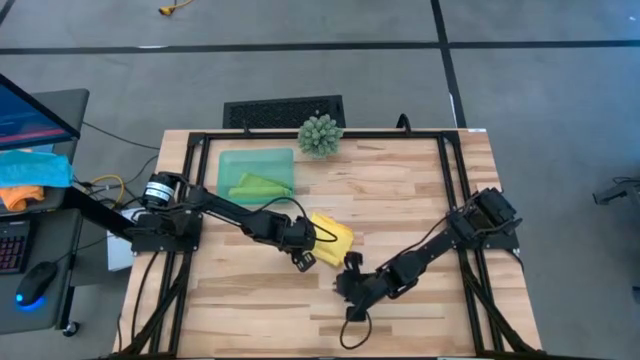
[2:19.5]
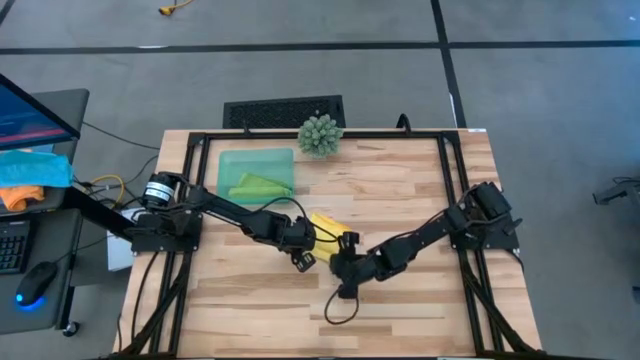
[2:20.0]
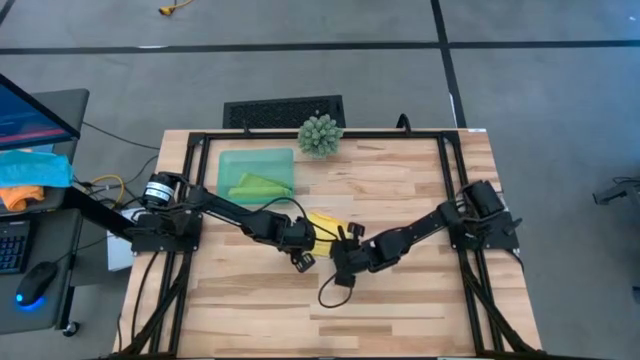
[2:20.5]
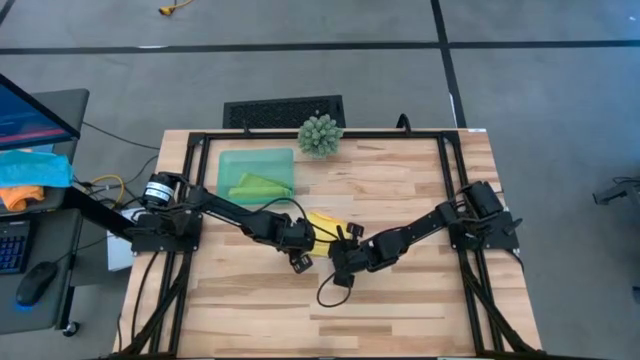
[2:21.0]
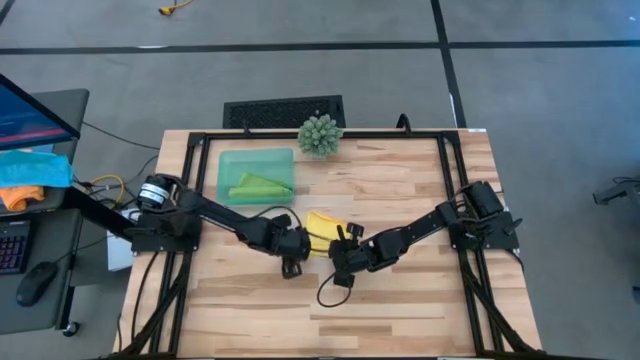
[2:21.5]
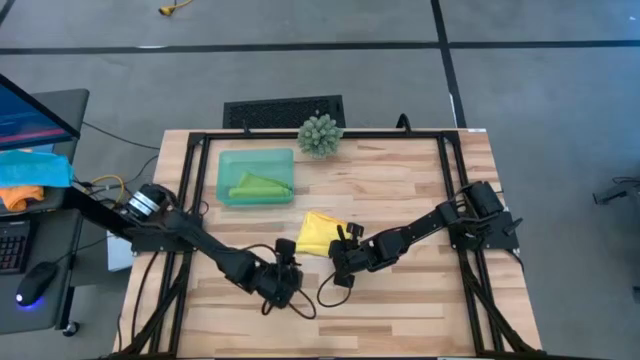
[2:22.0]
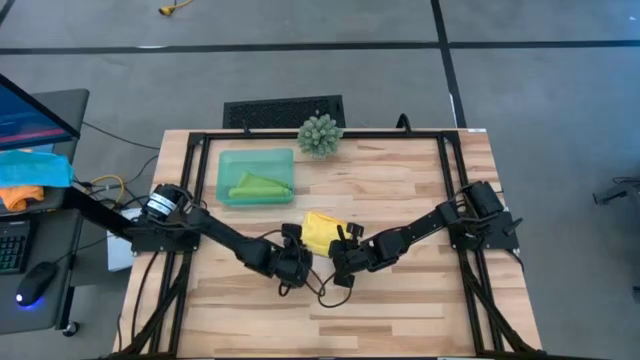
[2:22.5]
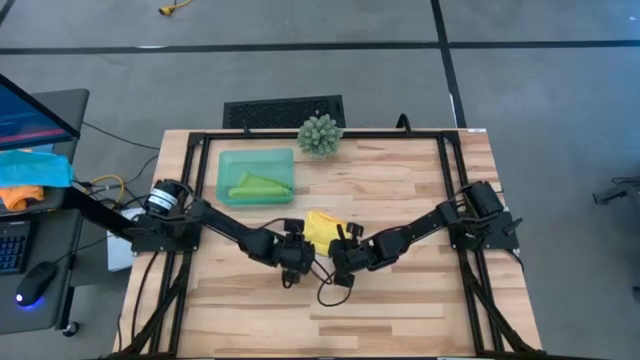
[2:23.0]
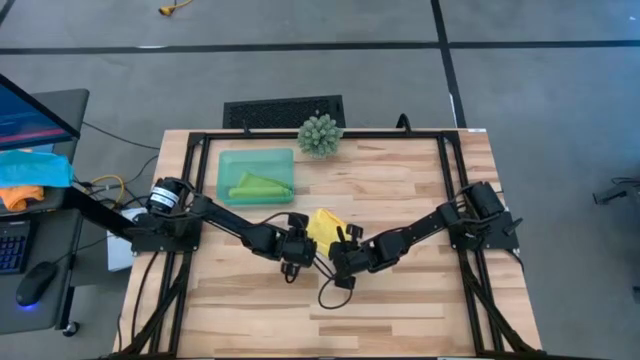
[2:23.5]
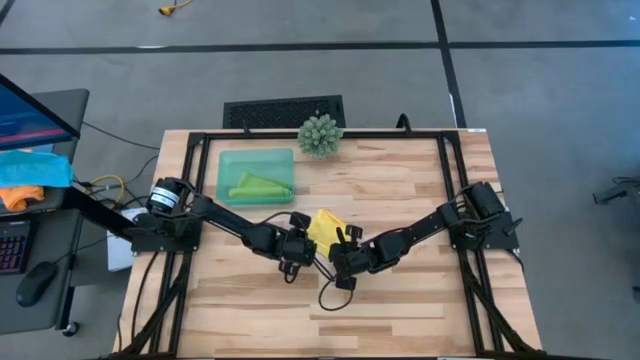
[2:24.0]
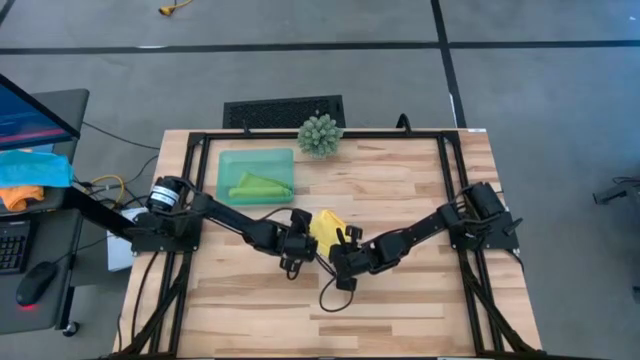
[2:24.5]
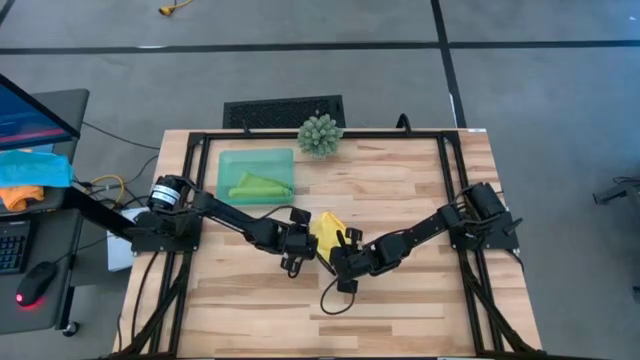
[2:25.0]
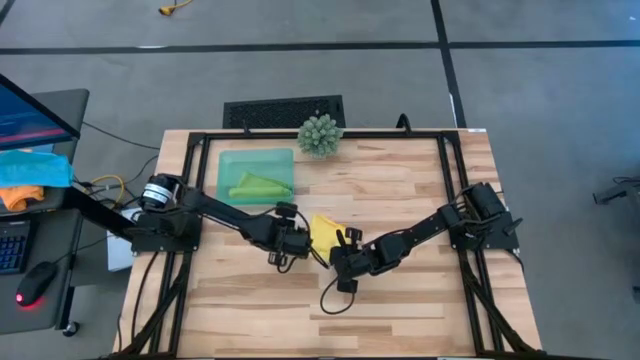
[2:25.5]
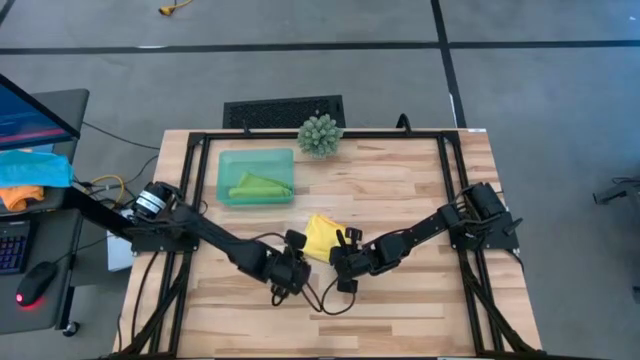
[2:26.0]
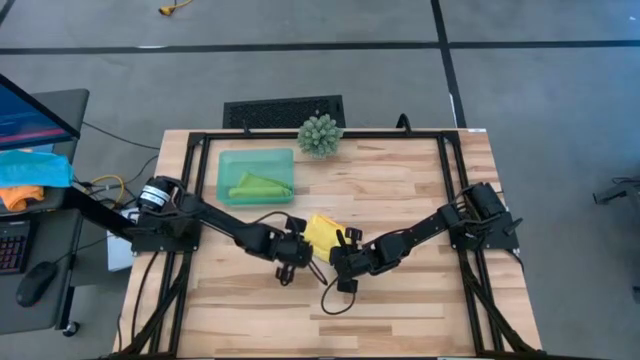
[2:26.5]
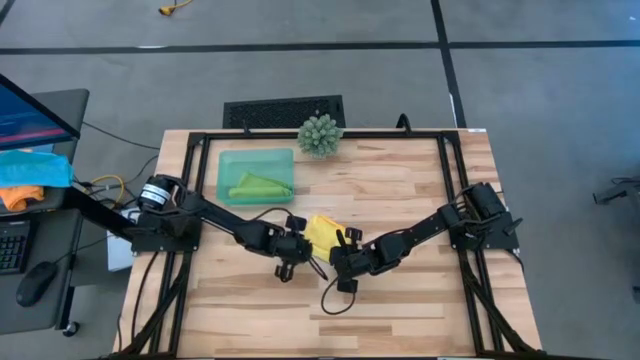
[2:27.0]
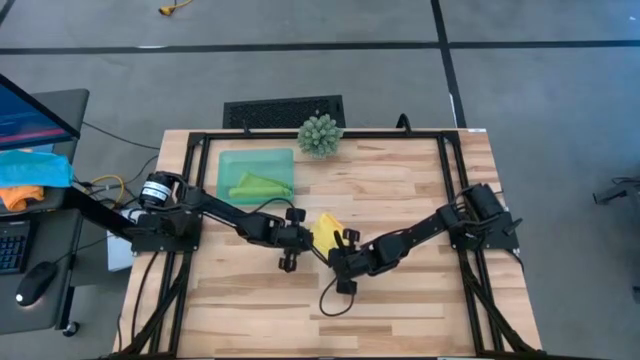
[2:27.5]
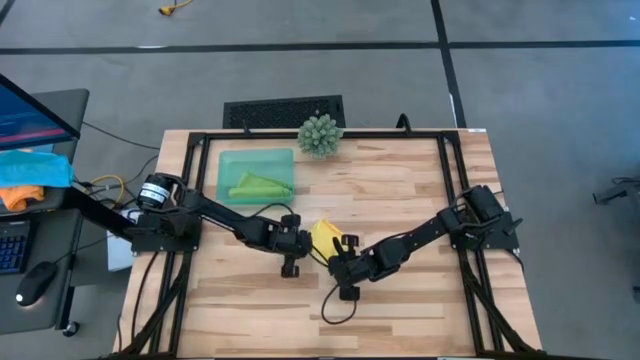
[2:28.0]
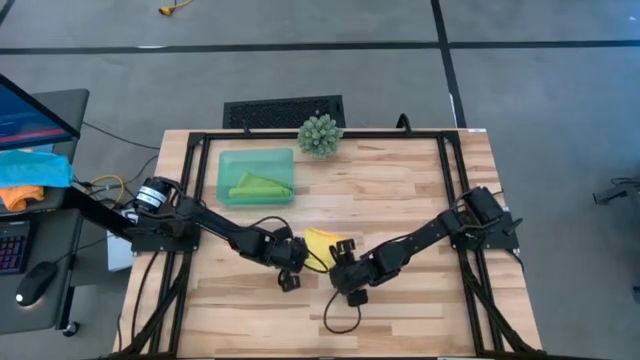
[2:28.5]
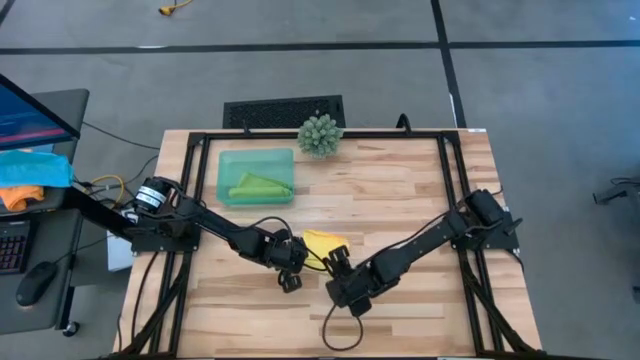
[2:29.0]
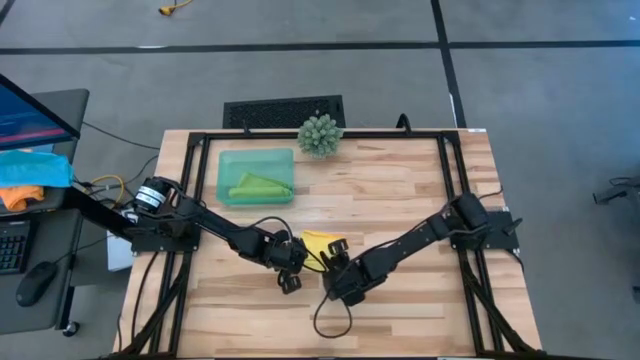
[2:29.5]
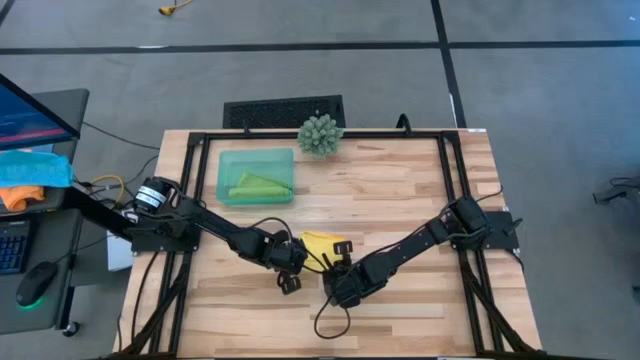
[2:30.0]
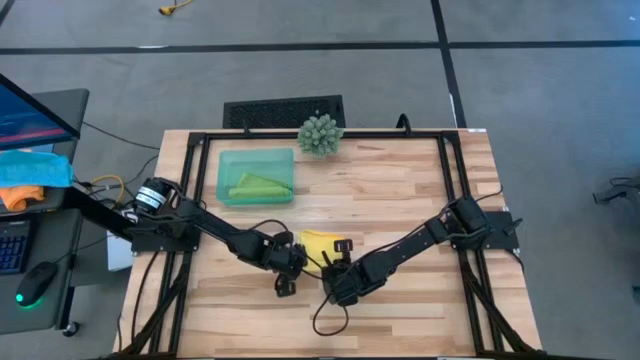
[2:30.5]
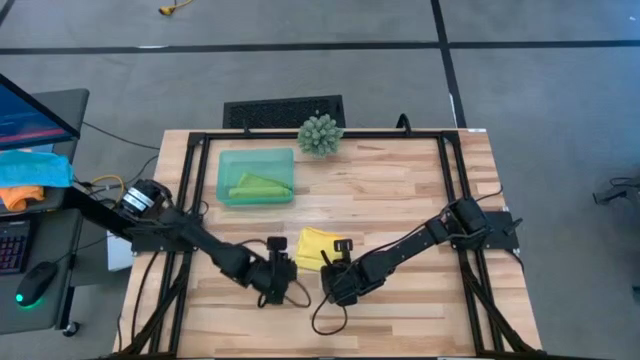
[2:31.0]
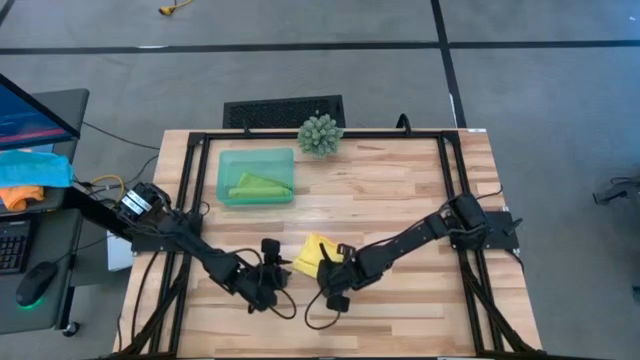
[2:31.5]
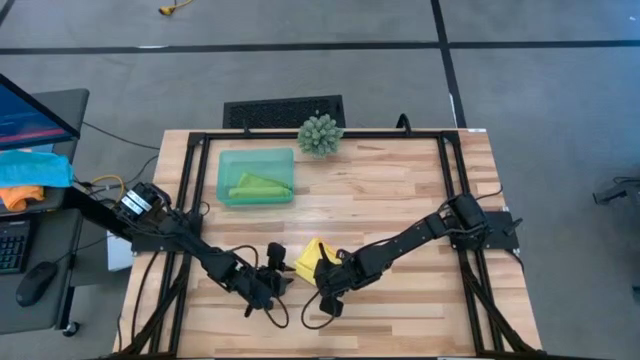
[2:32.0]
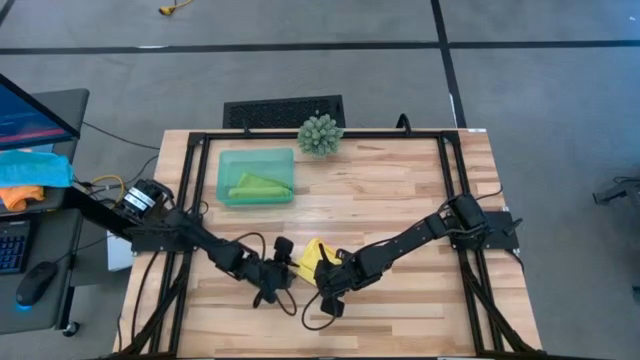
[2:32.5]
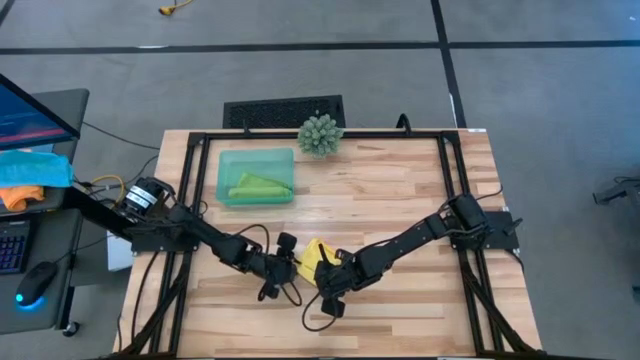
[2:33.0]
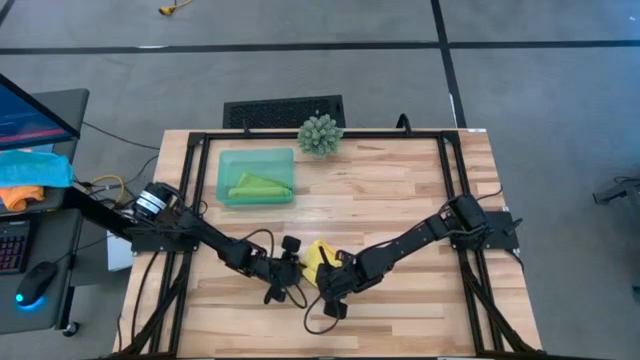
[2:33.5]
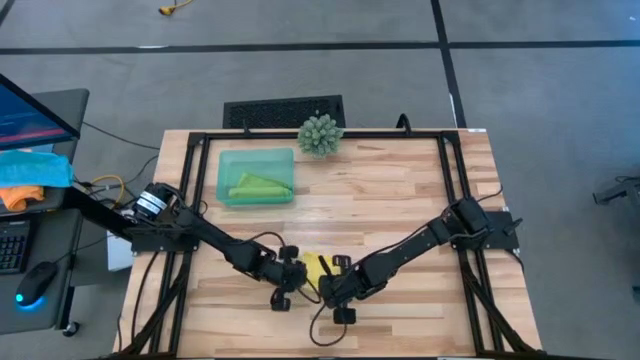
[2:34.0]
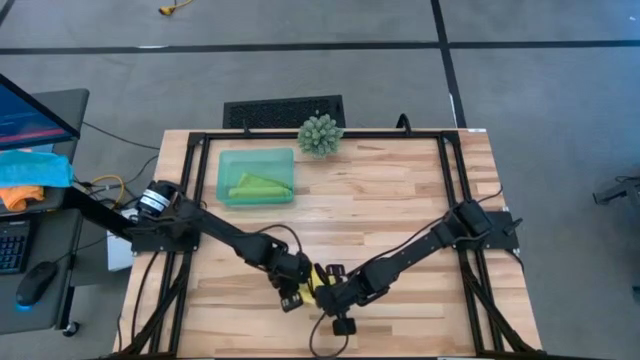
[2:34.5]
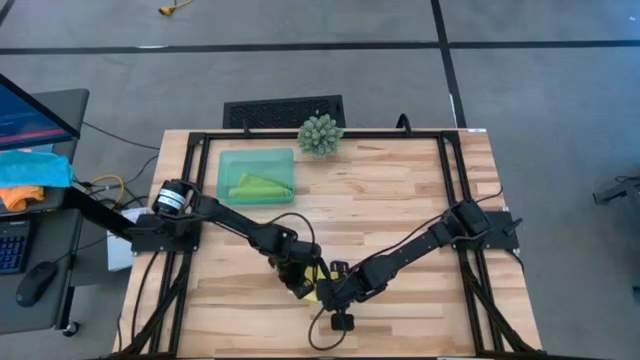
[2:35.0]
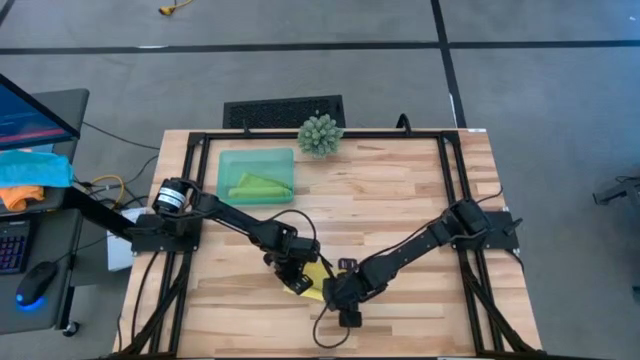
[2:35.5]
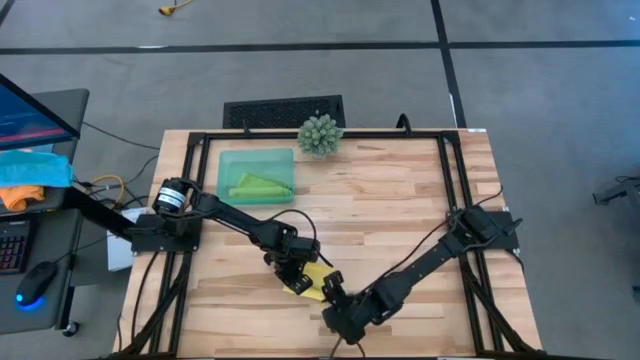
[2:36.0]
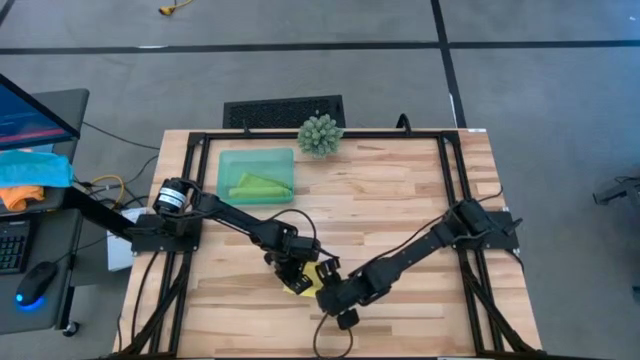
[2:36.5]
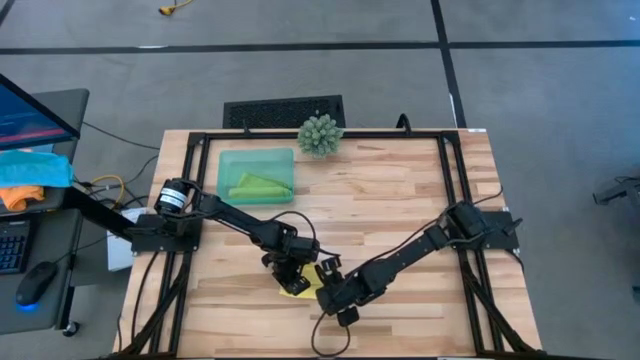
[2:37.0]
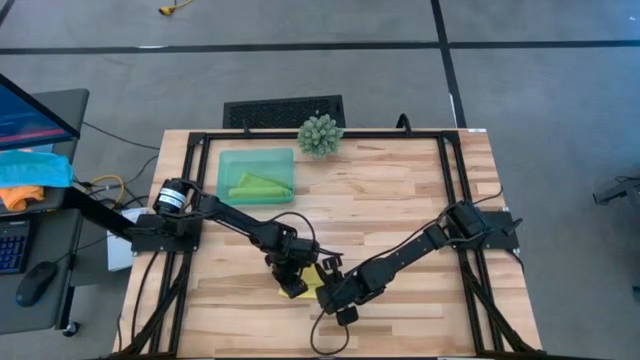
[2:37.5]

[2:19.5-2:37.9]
Task: Roll microfiber towels into tight, uniform cylinder then place into a basket
Roll the yellow towel

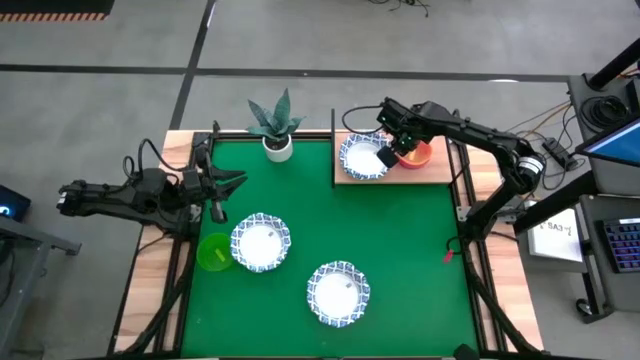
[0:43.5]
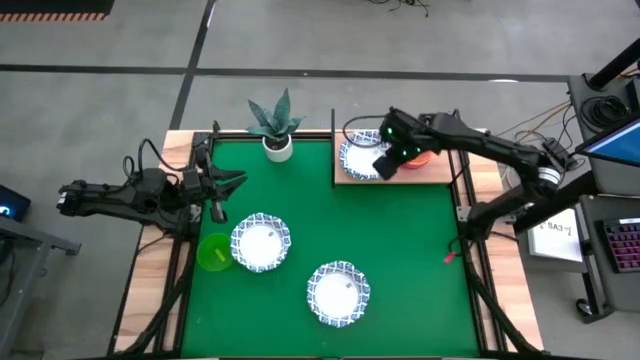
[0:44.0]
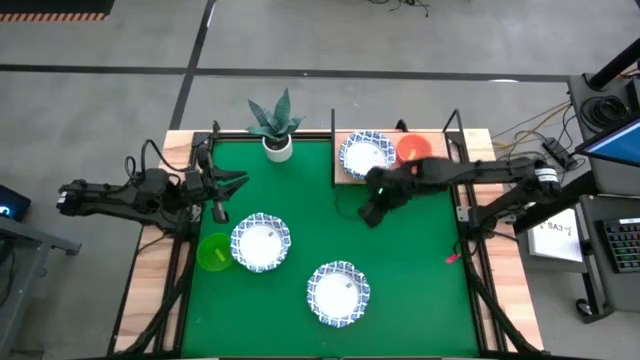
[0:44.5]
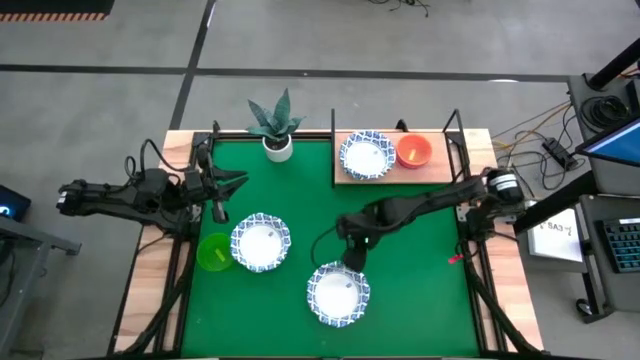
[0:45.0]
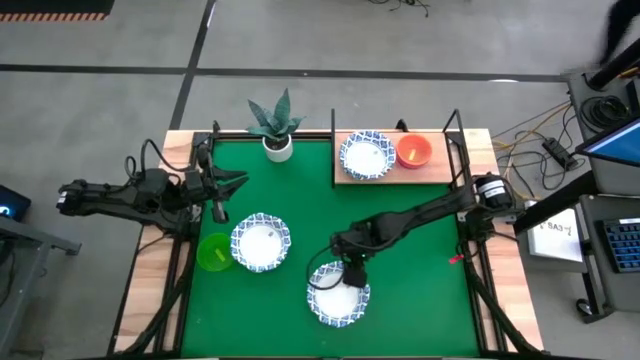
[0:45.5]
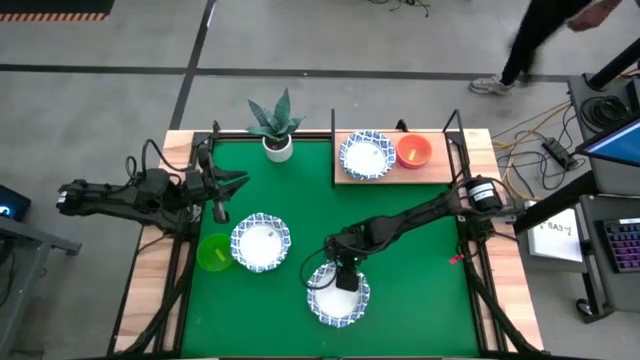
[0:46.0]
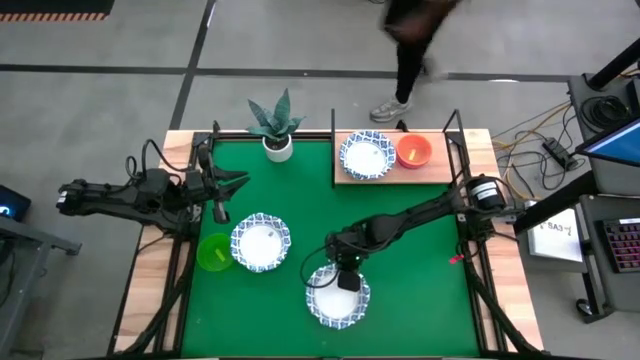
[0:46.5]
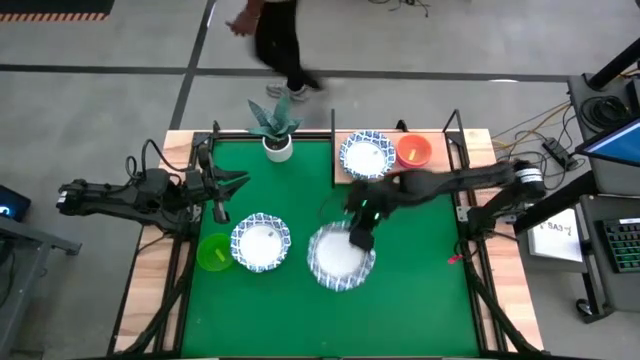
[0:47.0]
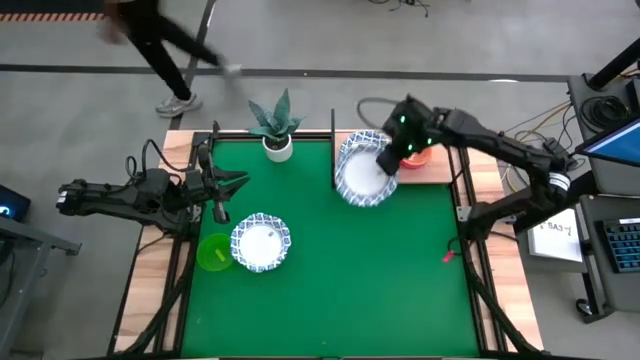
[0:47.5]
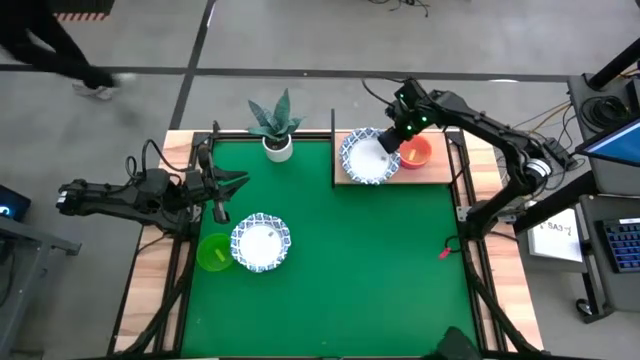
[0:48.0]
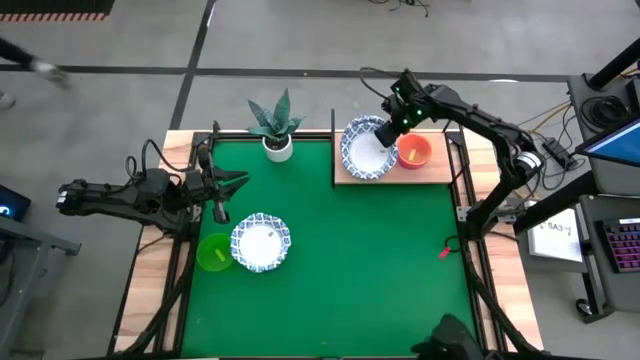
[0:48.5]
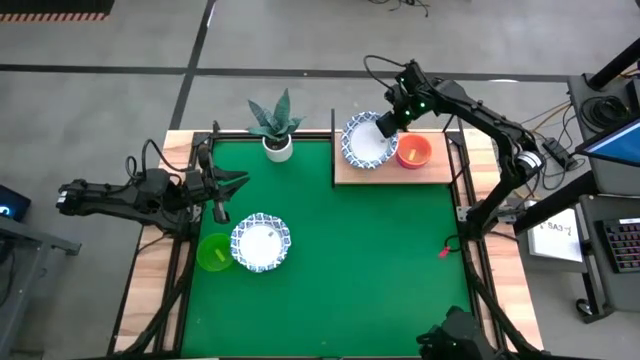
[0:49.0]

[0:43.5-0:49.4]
Task: Place and stack bowls onto a shelf
Stack the white patterned bowl on top of the white patterned bowl on the shelf
